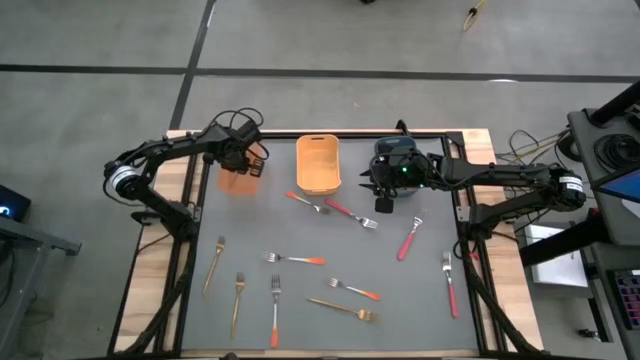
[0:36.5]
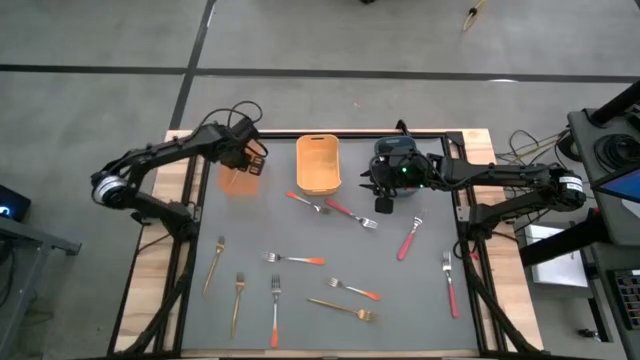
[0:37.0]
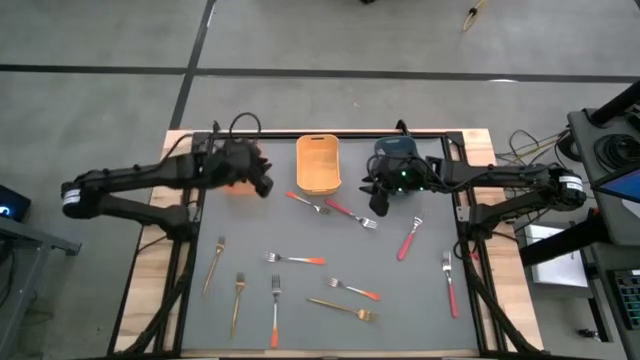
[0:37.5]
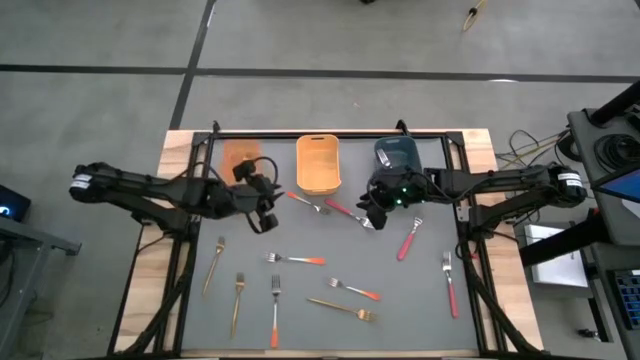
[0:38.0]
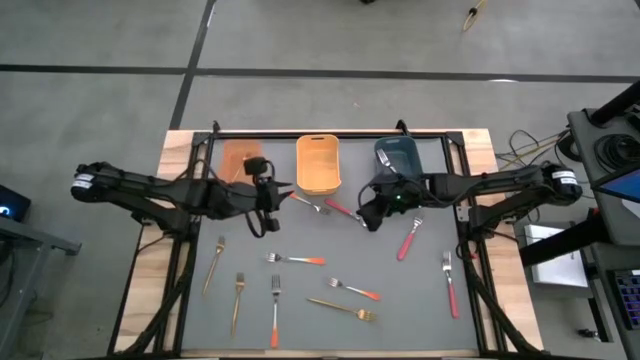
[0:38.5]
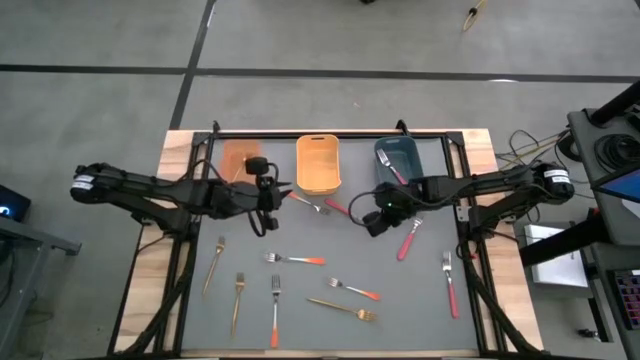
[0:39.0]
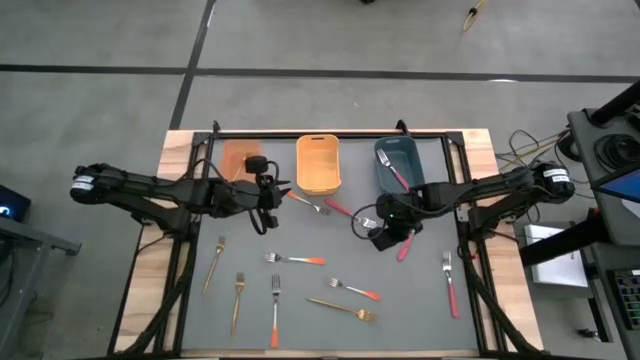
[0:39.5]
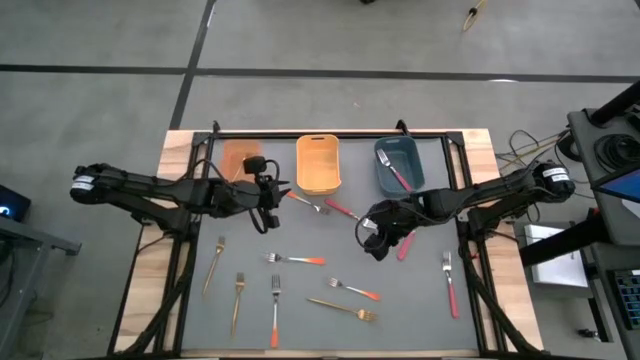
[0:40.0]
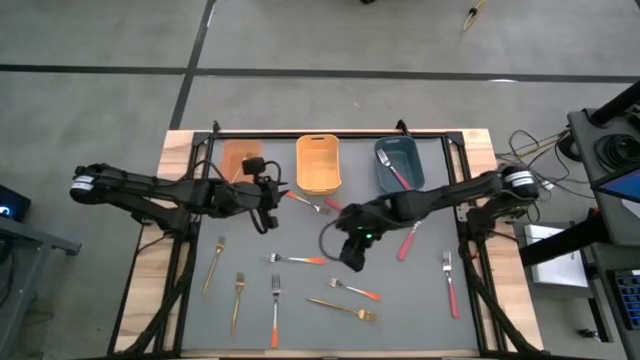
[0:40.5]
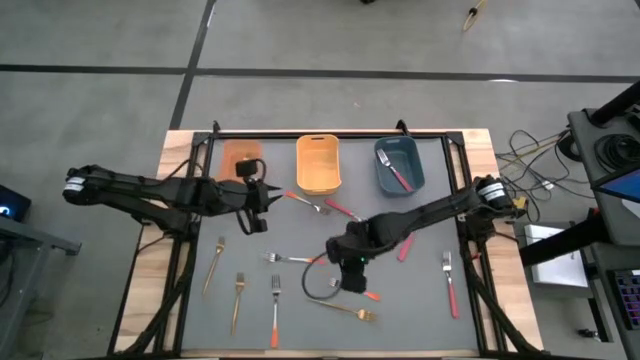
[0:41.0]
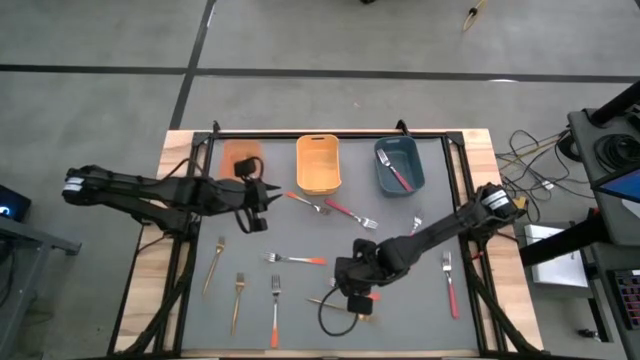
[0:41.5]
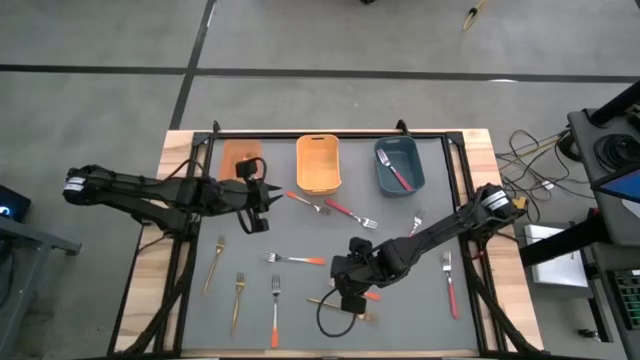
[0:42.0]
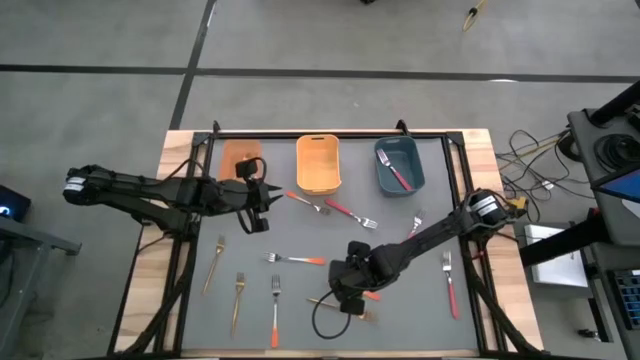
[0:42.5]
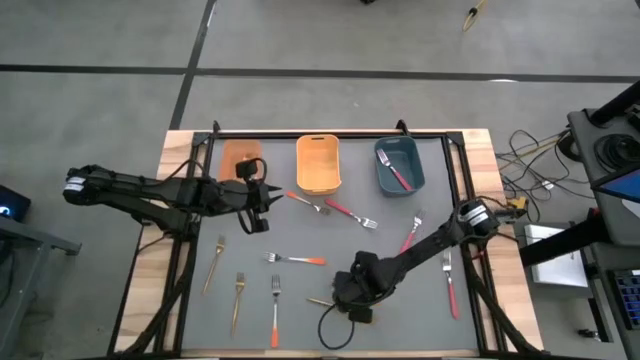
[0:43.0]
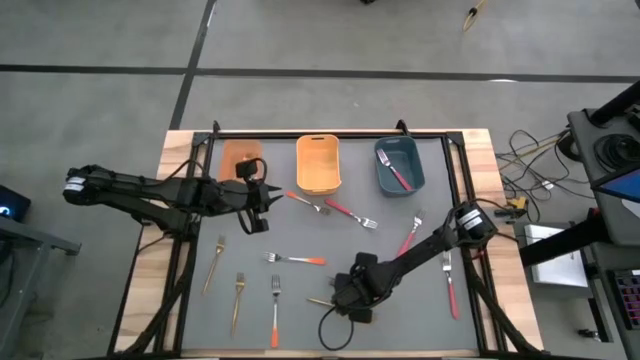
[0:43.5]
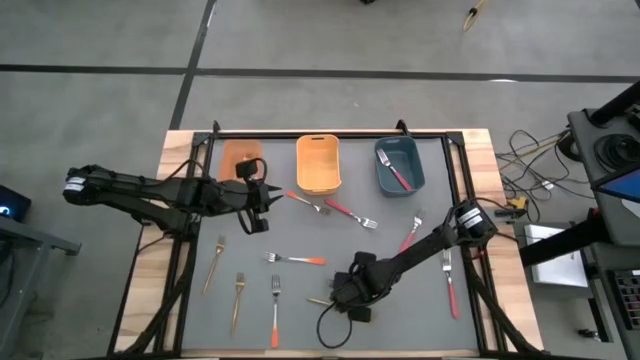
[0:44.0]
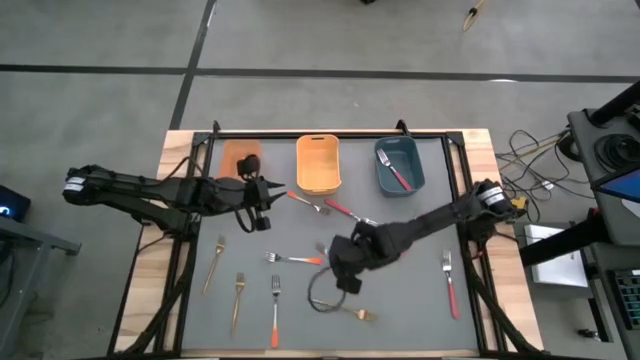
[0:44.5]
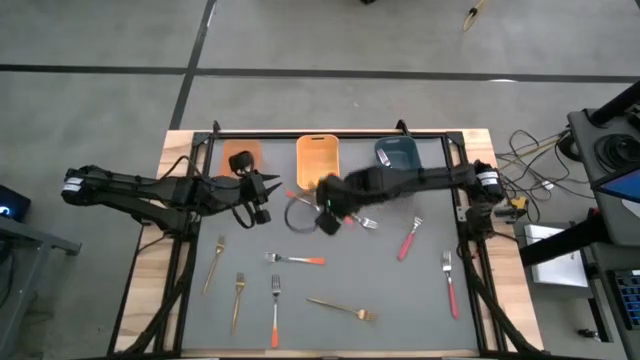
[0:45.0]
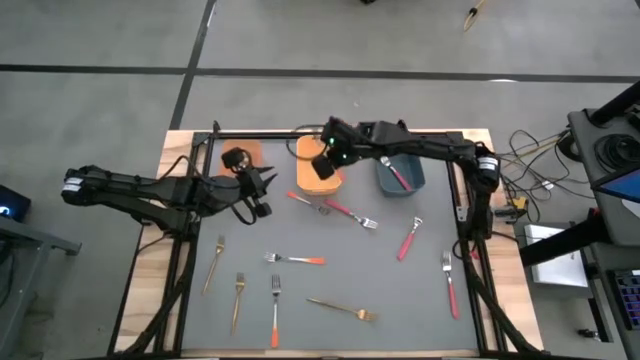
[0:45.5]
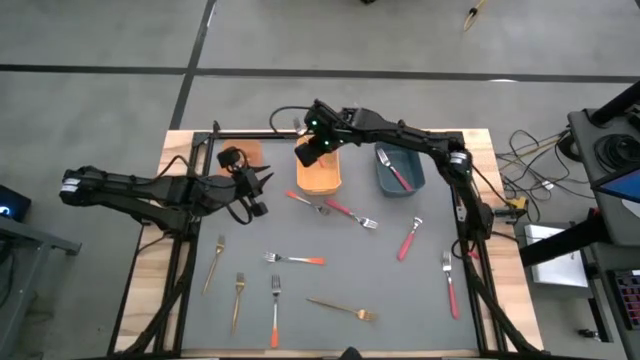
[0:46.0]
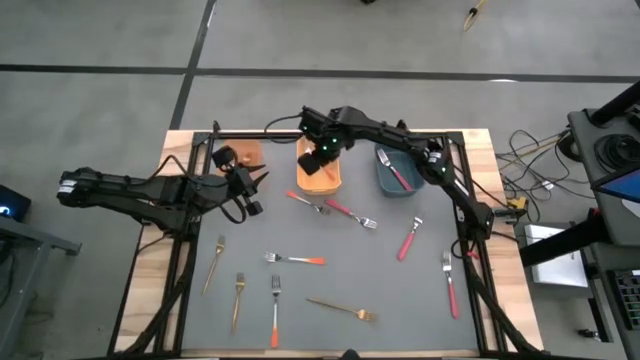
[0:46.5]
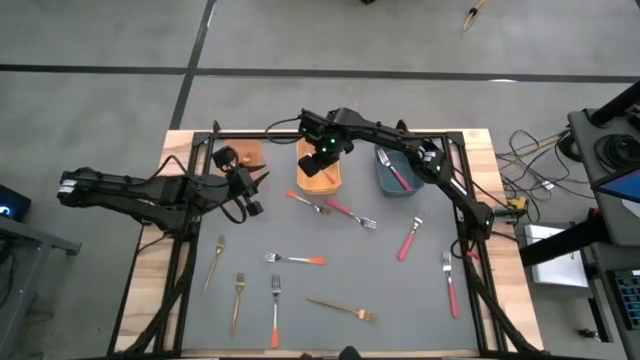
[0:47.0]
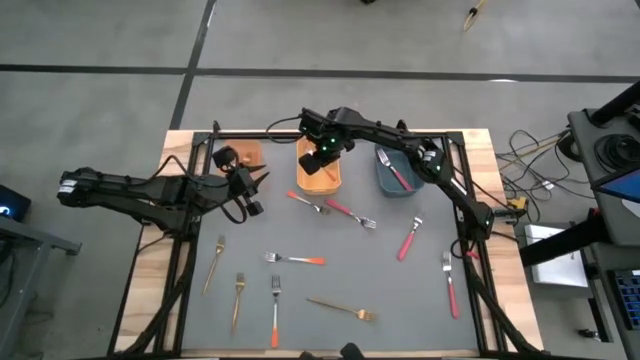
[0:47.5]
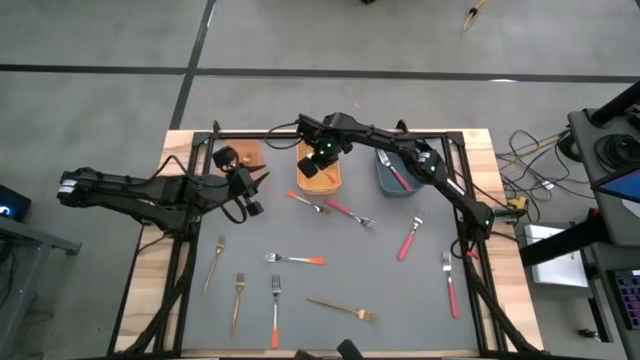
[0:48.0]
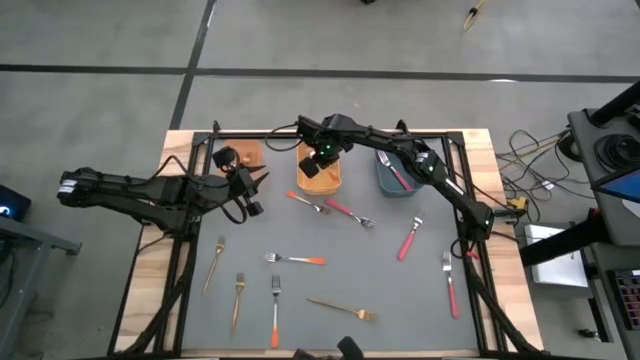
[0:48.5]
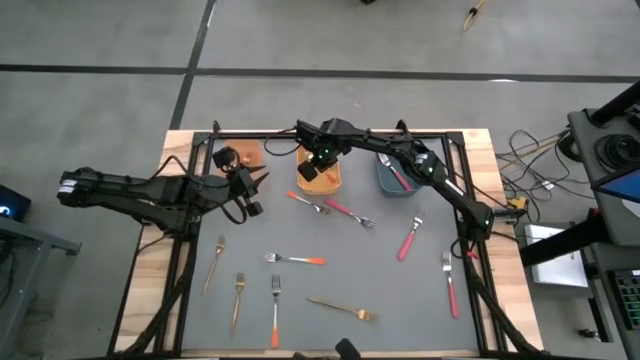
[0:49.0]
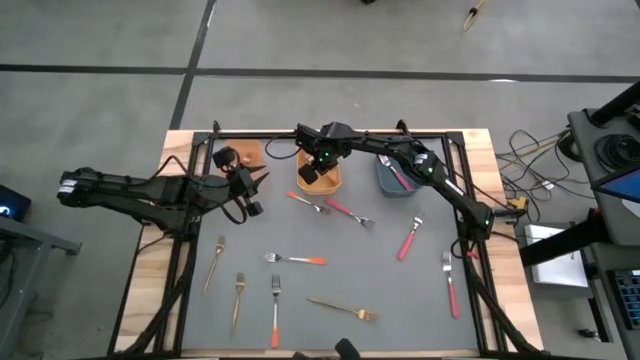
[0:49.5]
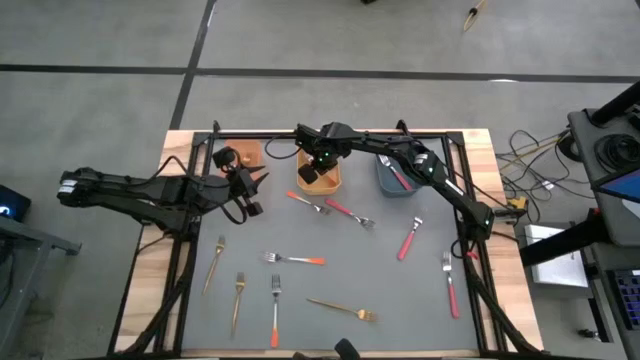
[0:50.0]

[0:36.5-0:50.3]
Task: Sort silverware by color (type)
Put the orange fork into the yellow bin

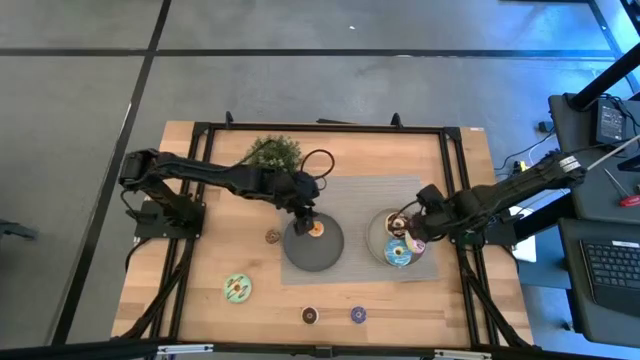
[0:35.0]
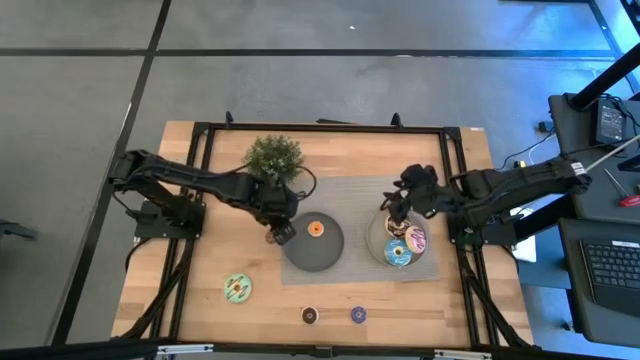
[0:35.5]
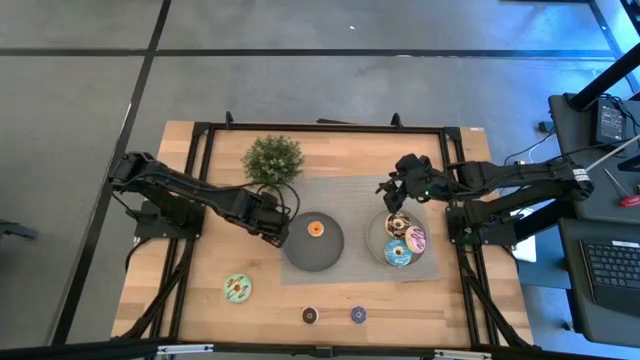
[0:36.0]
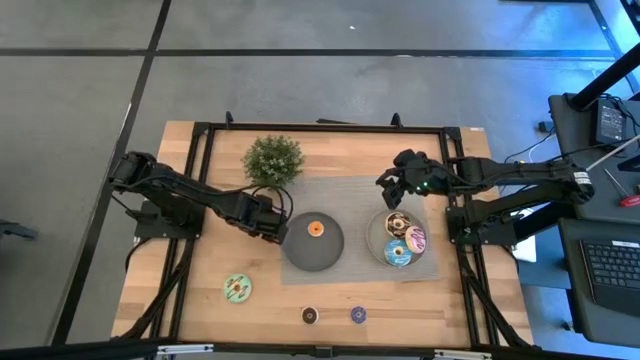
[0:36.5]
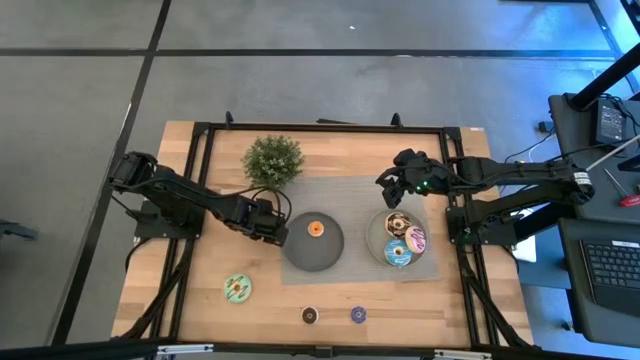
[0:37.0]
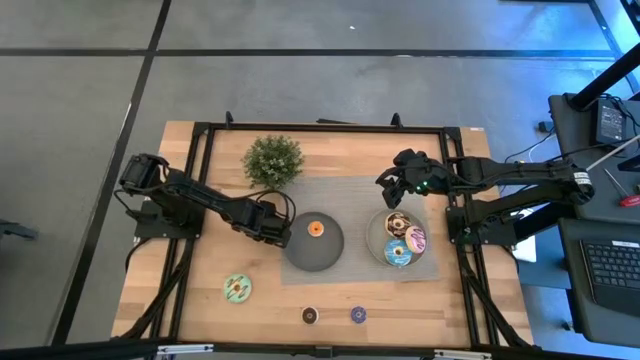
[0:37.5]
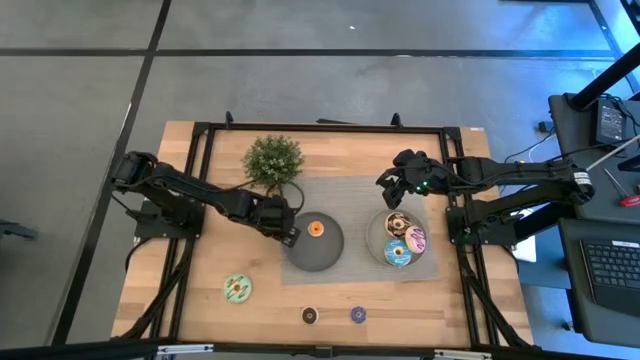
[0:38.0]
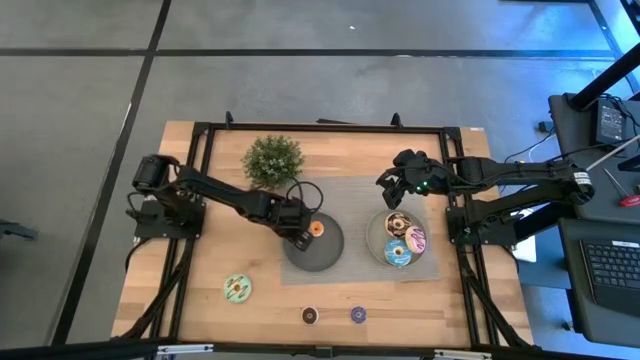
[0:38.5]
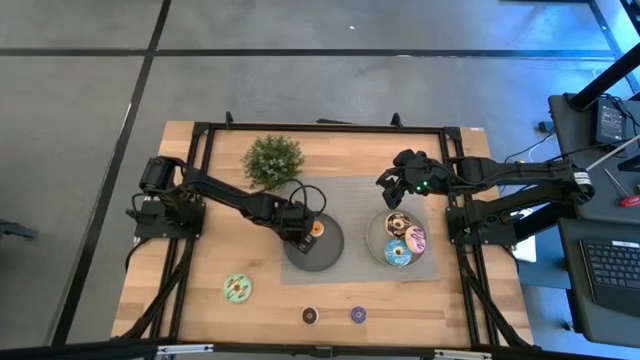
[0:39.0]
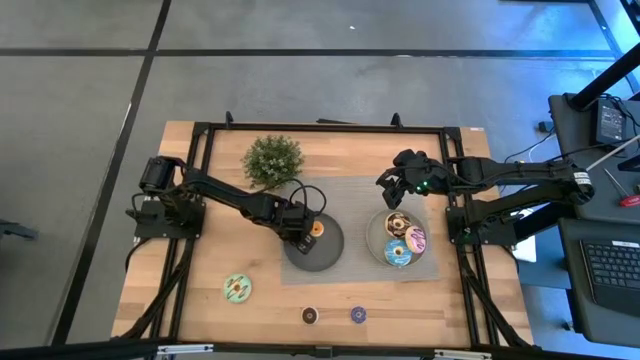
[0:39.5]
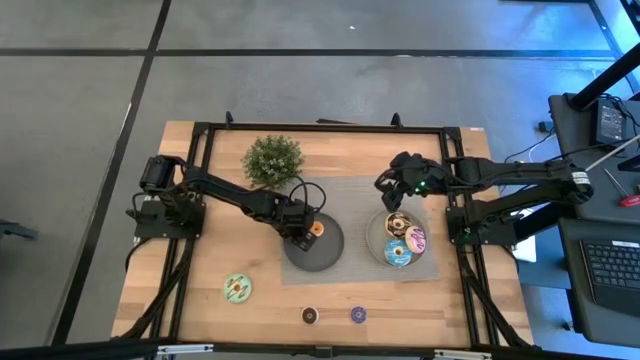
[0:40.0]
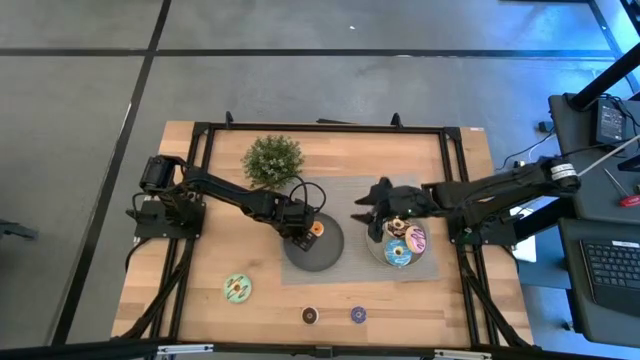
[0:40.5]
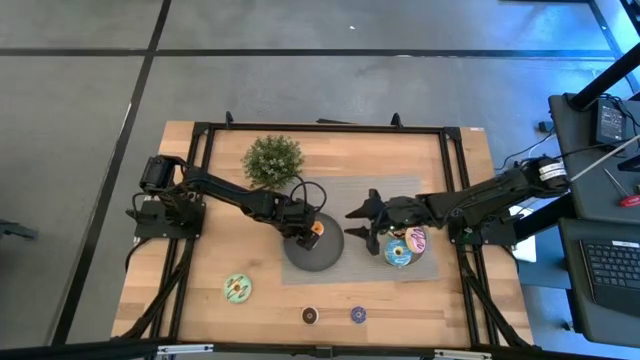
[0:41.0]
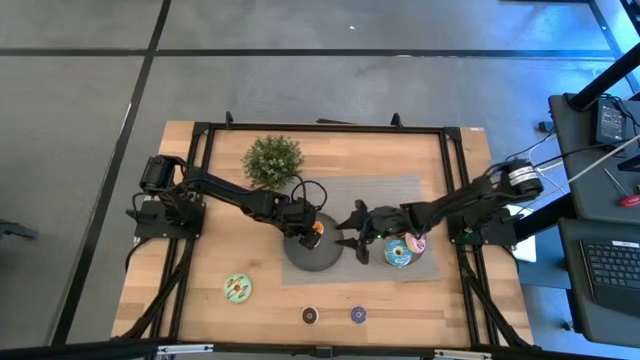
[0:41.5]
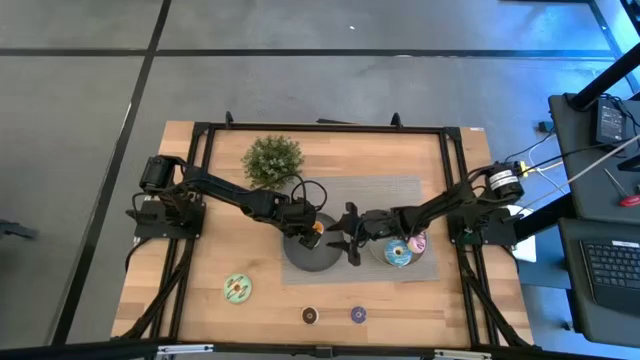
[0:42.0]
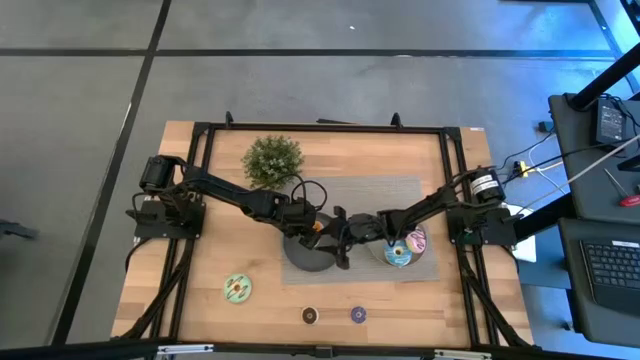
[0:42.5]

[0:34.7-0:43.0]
Task: Pick & Place donuts
Put the left small brown donut on the dark gray plate
